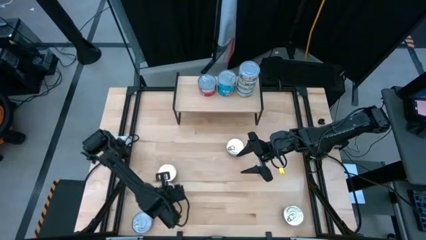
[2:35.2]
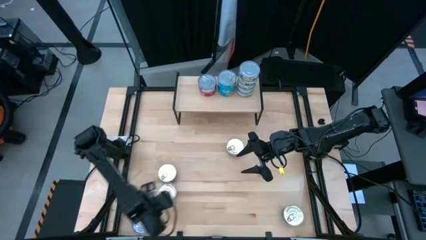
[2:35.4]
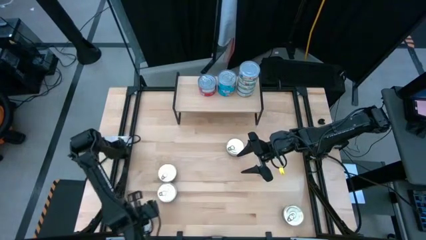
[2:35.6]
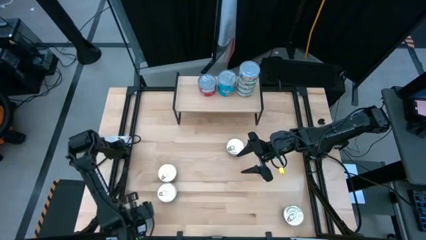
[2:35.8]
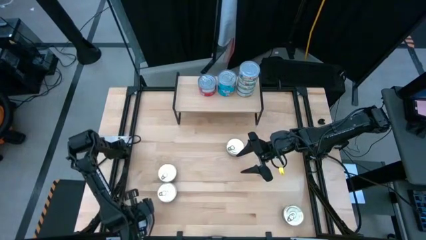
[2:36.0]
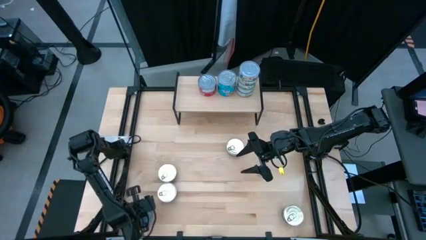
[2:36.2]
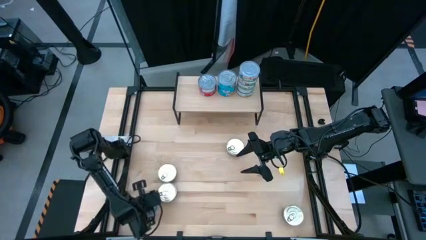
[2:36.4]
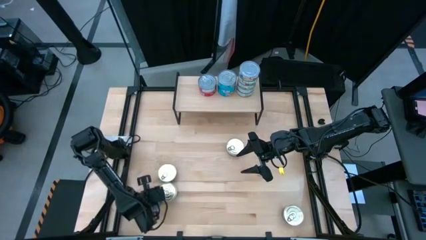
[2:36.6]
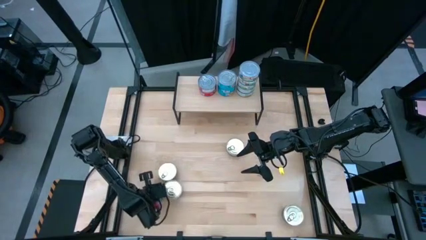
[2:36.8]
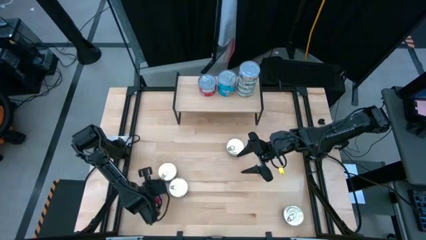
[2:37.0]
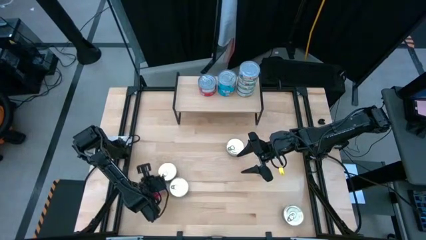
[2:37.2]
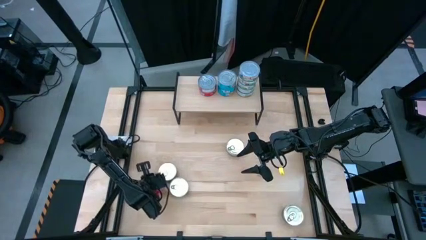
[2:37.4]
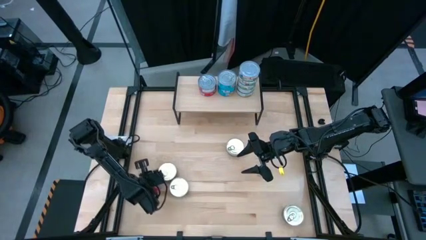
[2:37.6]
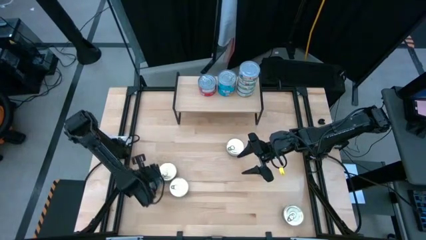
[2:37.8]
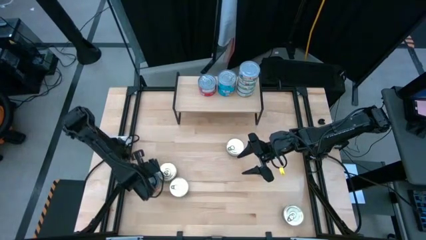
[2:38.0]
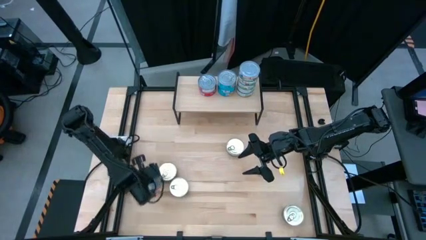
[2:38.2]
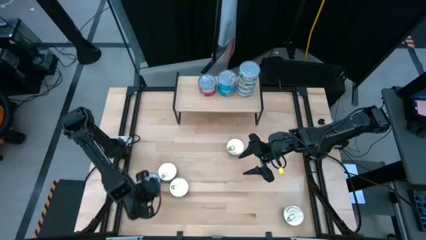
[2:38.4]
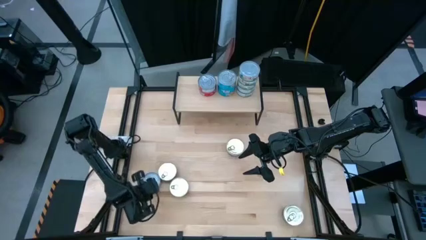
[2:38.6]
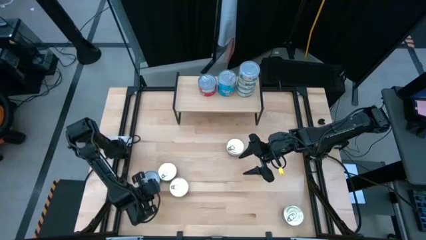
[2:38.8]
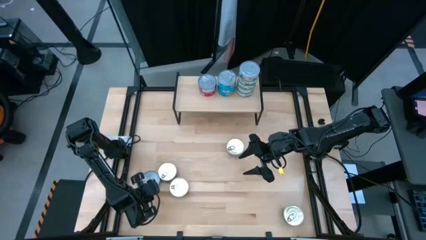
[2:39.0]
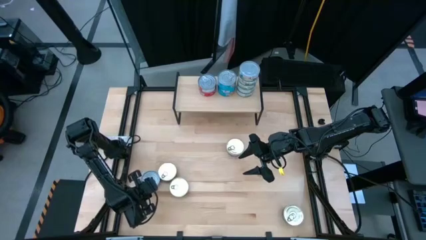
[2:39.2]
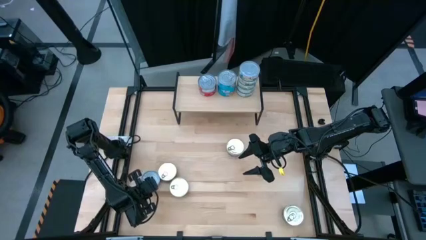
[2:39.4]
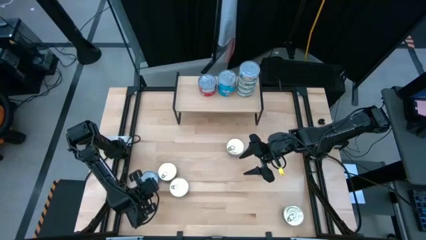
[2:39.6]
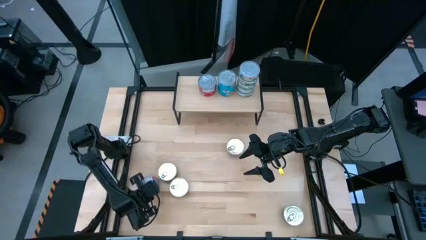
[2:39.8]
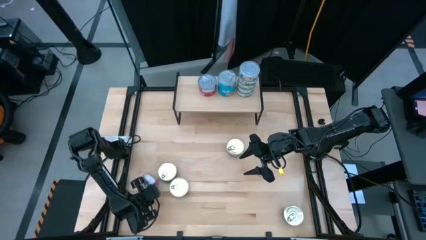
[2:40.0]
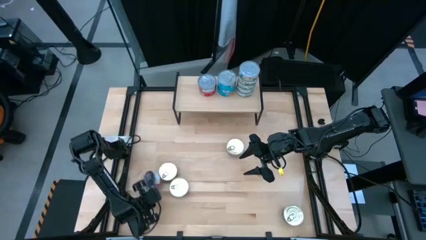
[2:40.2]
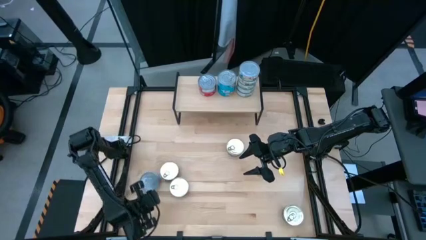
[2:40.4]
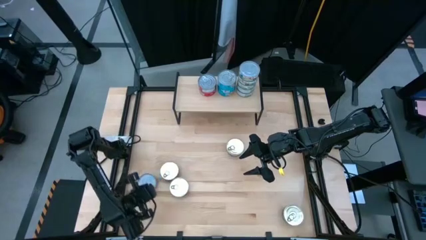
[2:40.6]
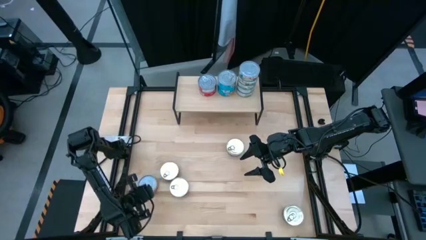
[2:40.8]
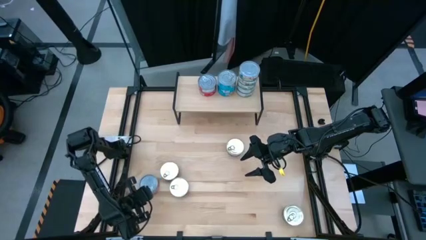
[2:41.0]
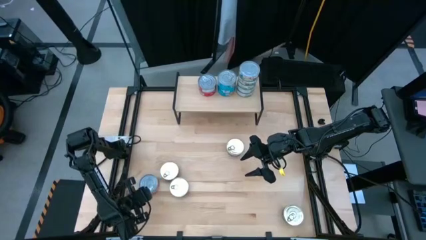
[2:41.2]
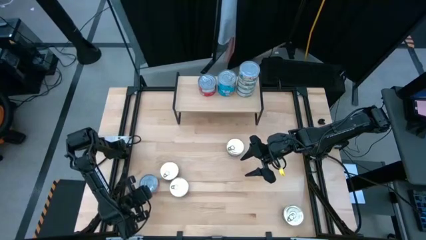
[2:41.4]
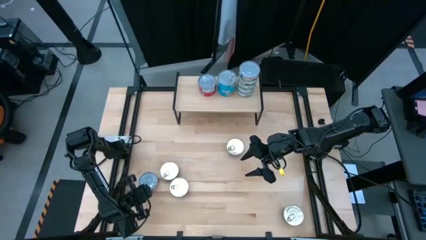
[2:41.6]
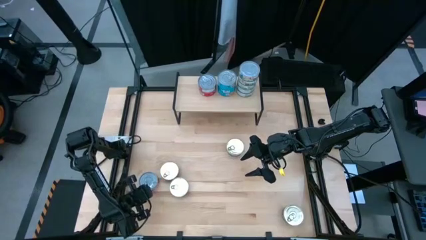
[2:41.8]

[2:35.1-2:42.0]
Task: Stack canned seafood by type on shelf
Stack the red tuna can on top of the other red tuna cans on the shelf

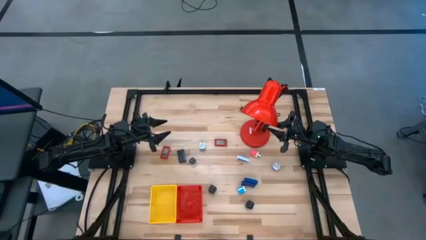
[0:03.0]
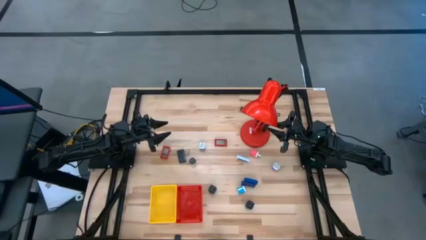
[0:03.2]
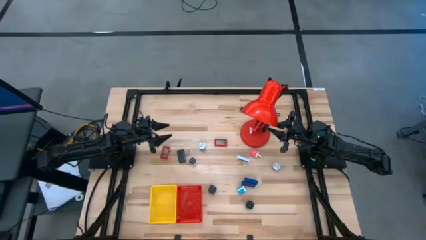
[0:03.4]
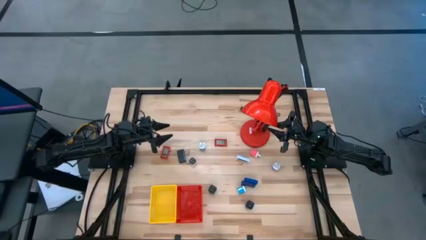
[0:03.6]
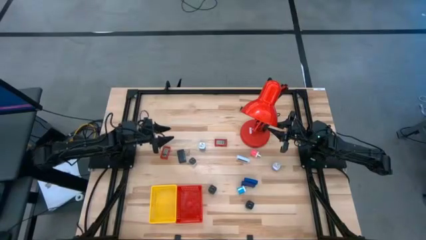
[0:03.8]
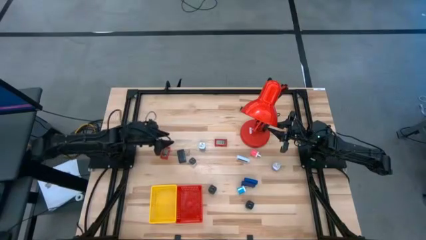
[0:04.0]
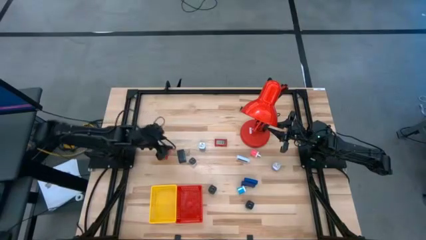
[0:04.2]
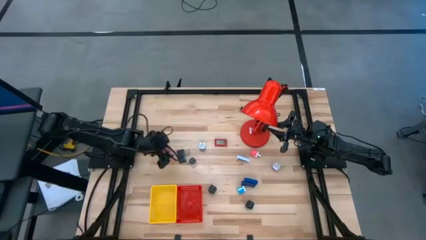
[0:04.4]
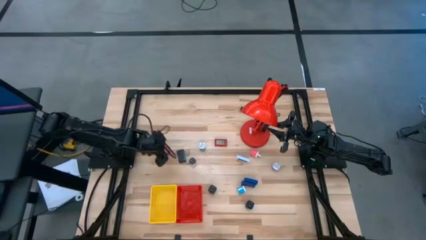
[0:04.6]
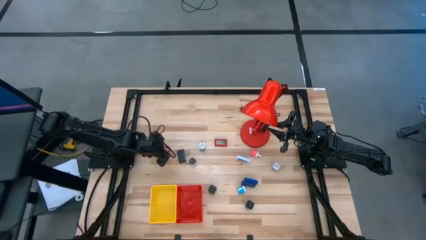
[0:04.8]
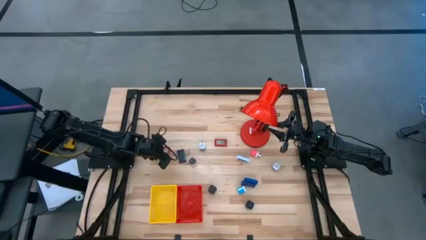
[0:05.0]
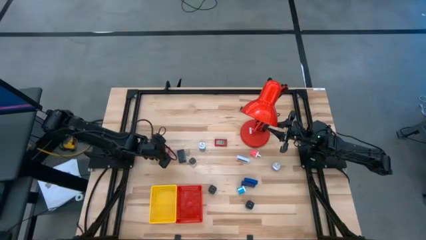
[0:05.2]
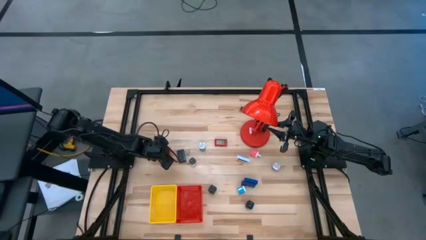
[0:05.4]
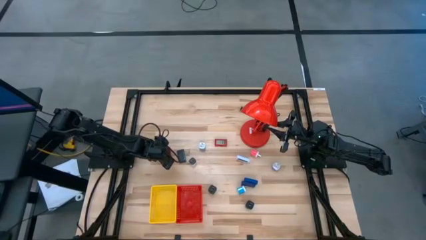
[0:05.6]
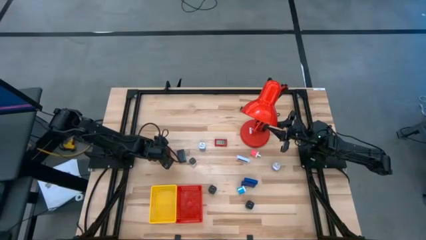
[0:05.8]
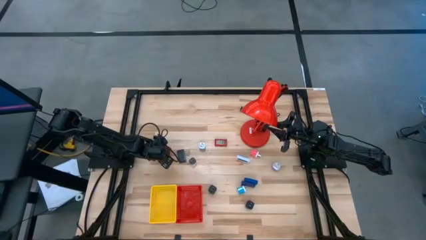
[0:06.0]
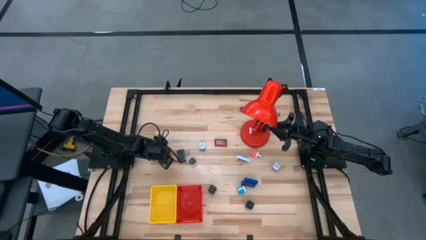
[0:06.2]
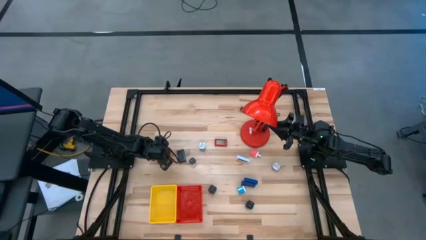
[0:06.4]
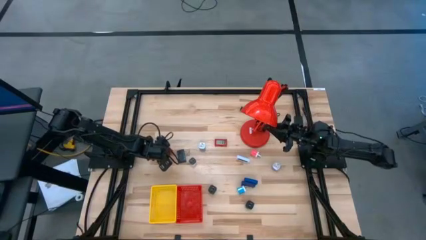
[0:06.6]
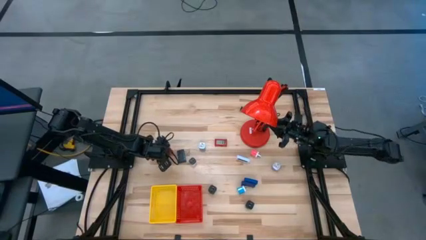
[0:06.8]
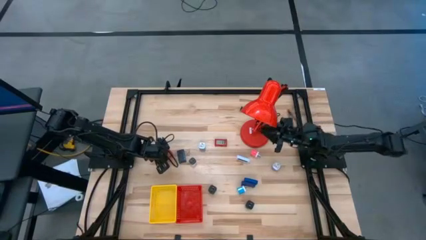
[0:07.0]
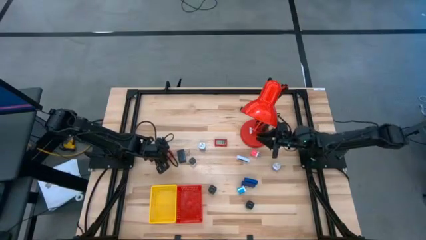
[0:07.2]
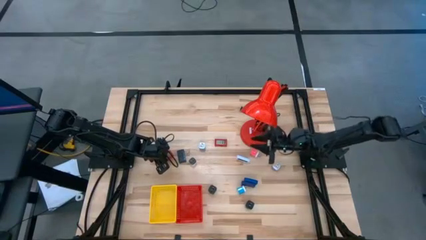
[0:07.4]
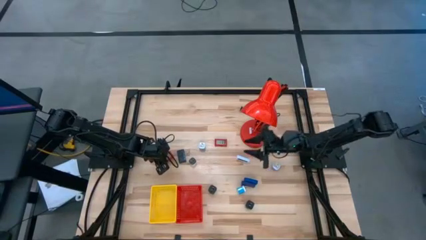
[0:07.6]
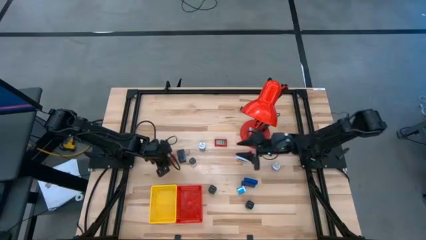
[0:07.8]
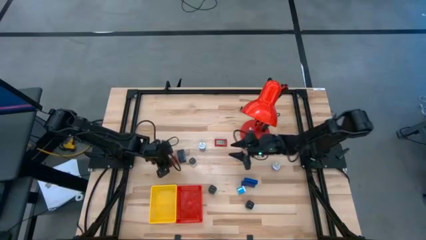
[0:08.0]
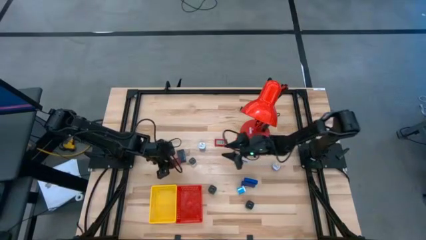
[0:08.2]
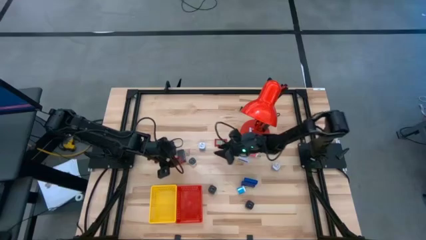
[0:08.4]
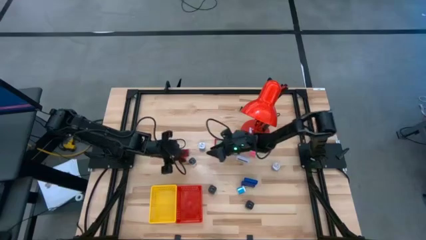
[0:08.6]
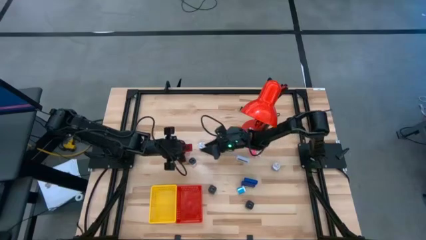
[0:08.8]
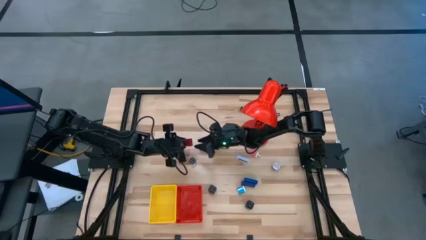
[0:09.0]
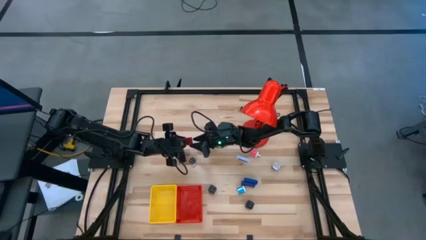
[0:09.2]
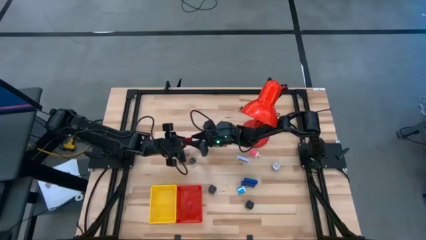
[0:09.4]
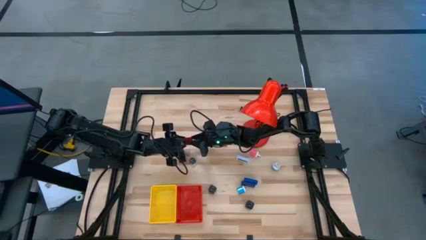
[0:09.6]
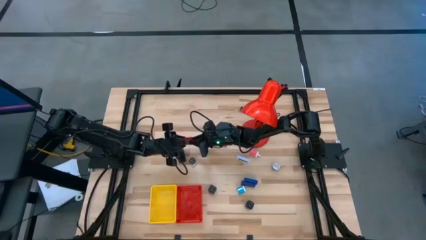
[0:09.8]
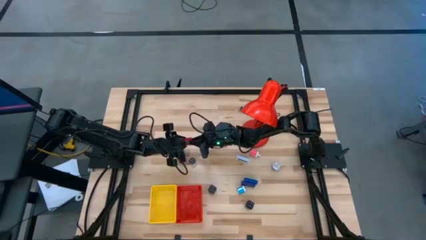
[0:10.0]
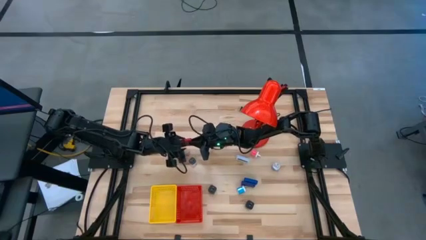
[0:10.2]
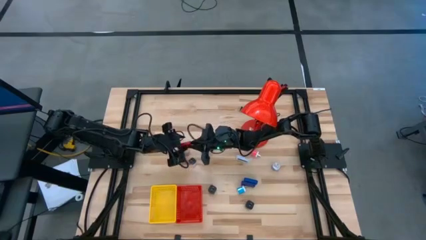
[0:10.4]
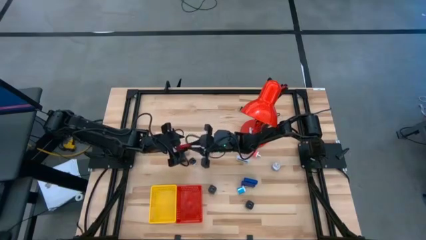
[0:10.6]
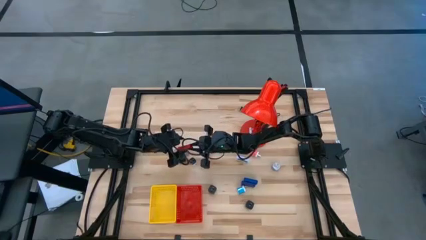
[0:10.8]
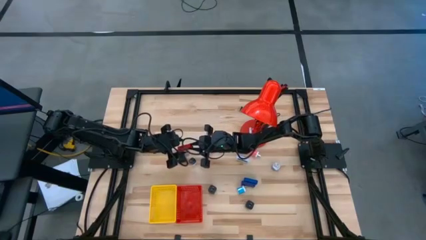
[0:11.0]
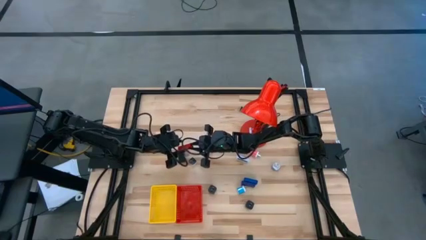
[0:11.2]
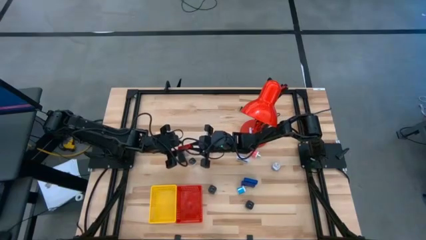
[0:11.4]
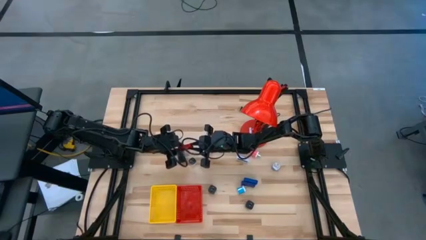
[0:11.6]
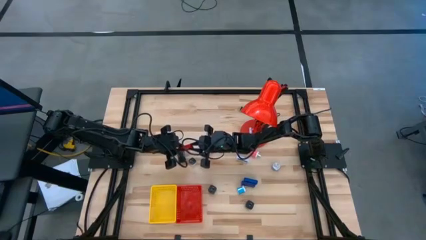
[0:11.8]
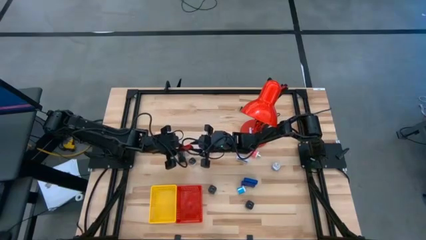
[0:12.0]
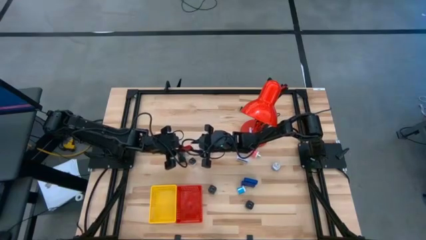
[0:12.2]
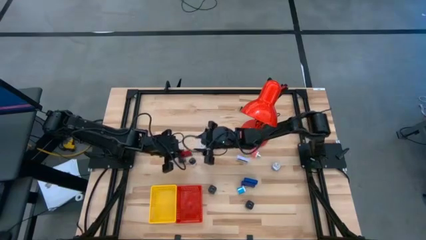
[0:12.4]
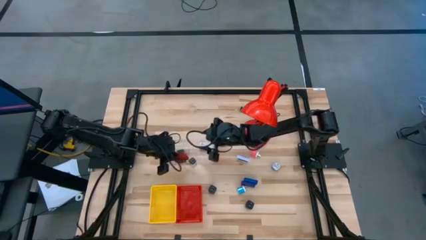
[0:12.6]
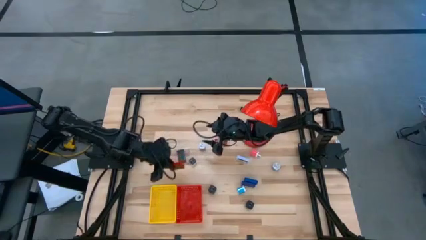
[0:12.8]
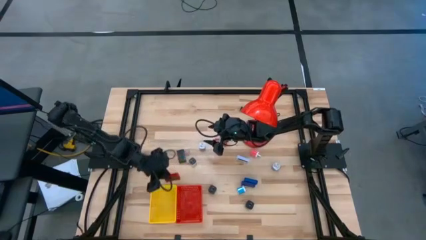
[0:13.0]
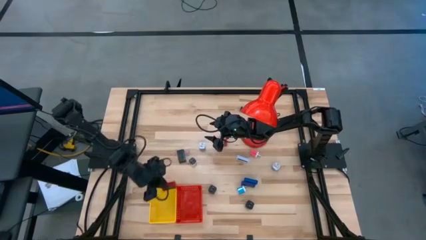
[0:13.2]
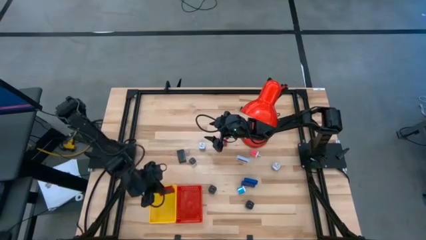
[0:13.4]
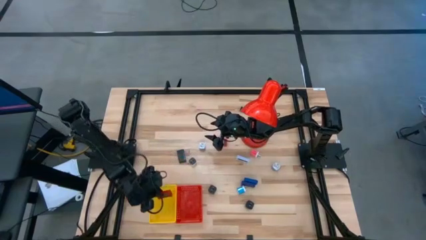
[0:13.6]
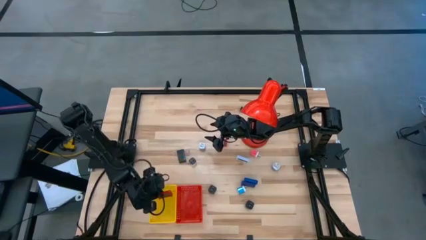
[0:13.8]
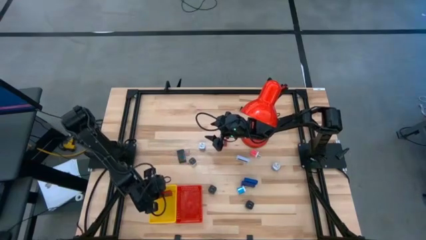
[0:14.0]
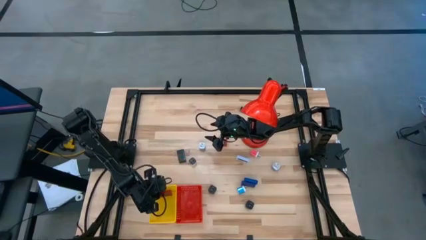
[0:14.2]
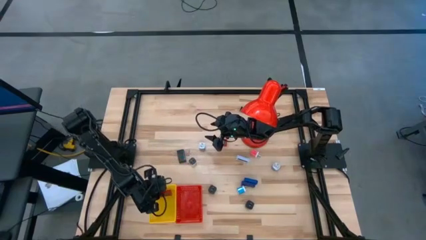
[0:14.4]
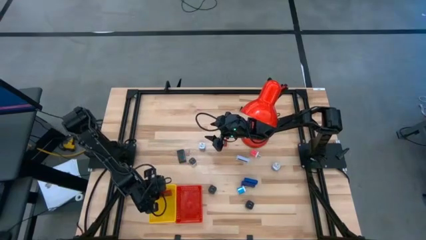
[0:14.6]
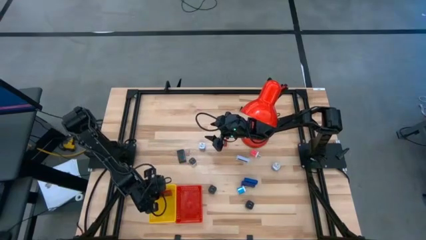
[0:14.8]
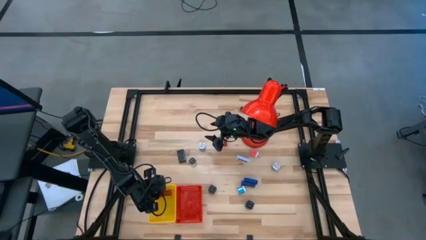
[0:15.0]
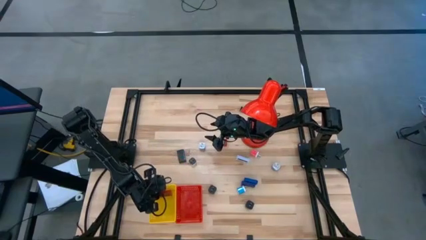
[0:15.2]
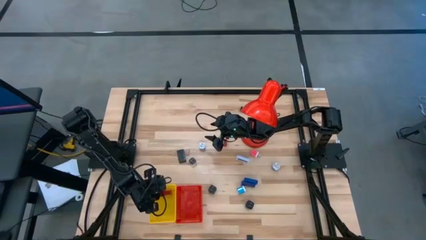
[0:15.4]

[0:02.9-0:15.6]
Task: Pick & Place Office items
Put the left red digital clock into the yellow bin
